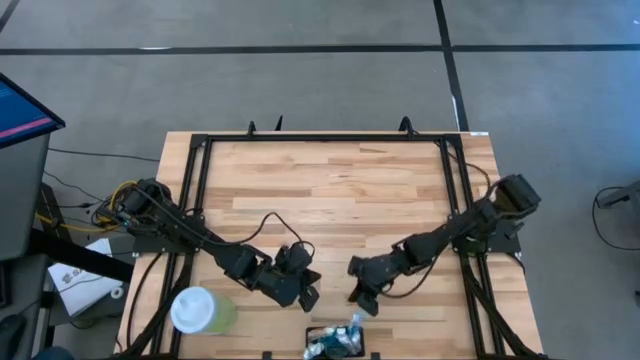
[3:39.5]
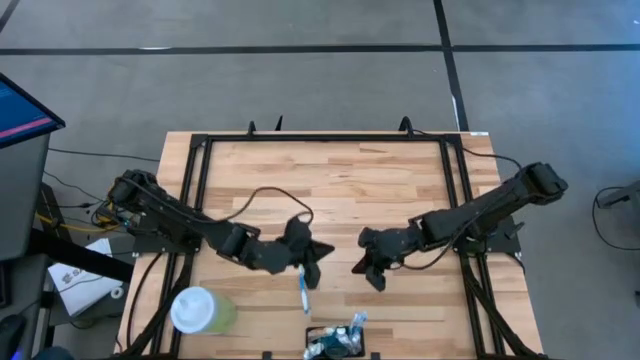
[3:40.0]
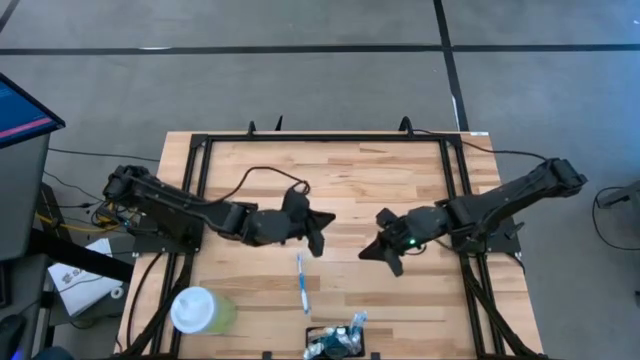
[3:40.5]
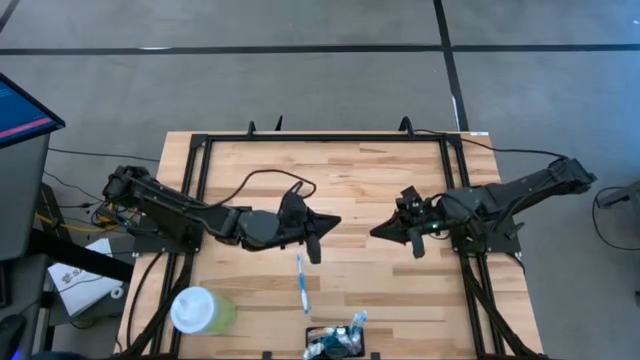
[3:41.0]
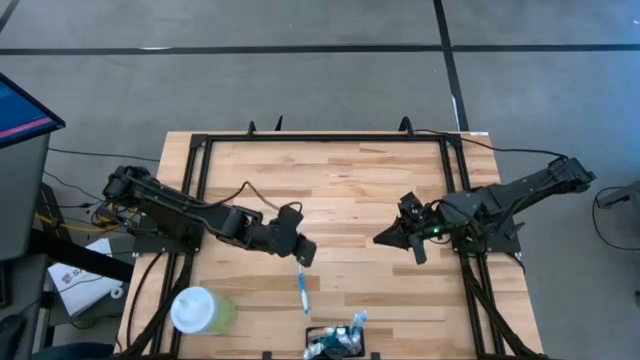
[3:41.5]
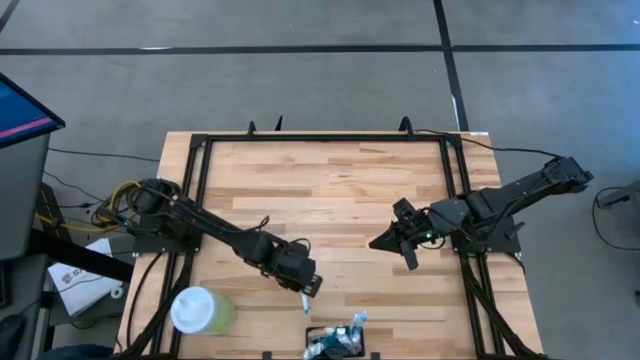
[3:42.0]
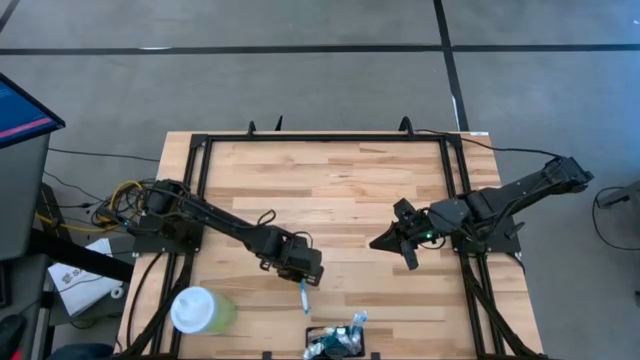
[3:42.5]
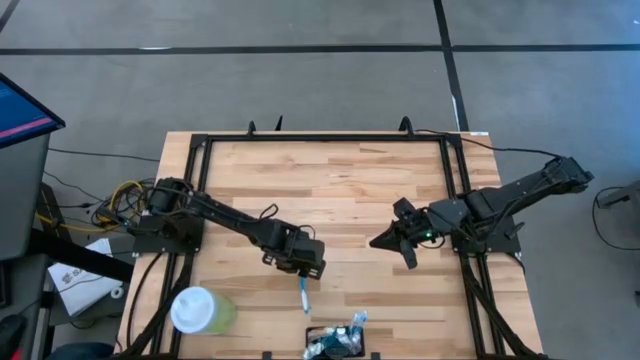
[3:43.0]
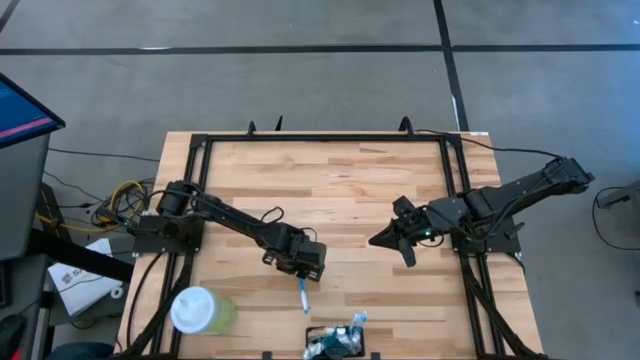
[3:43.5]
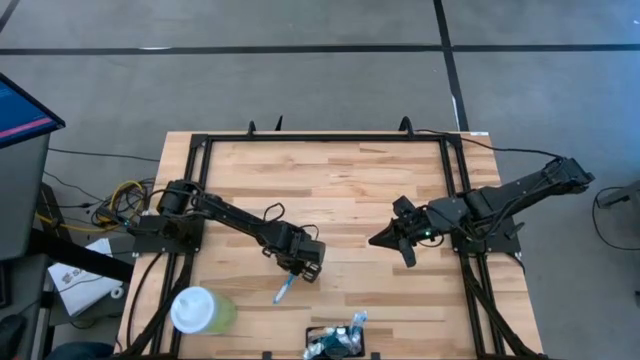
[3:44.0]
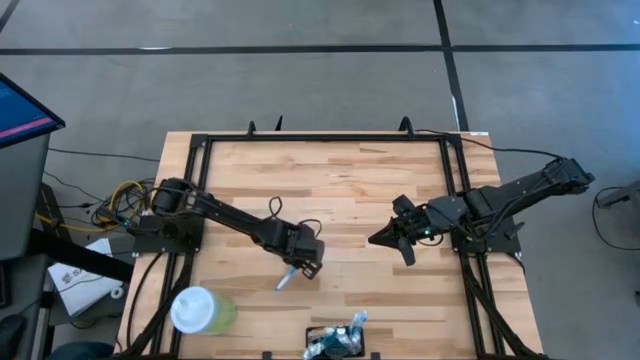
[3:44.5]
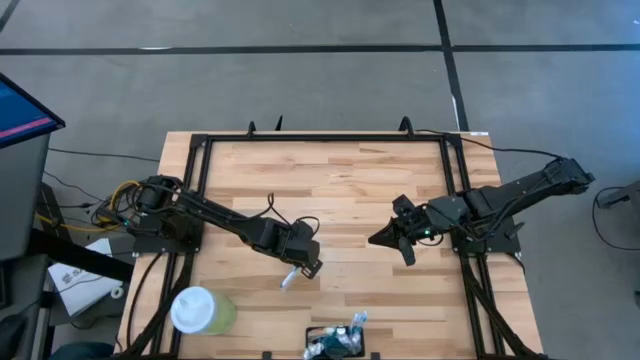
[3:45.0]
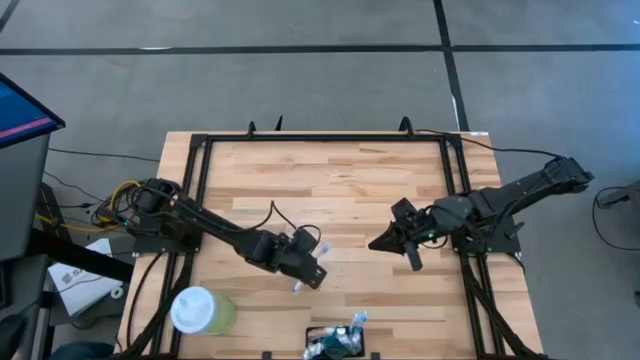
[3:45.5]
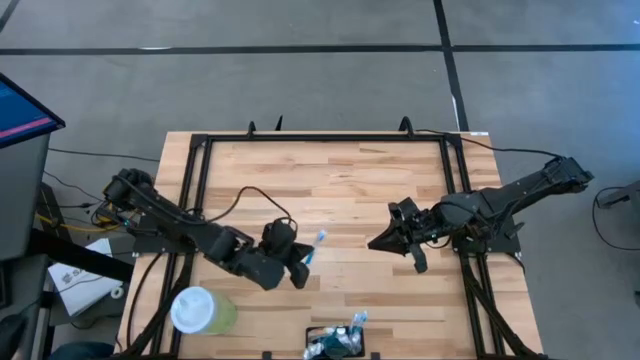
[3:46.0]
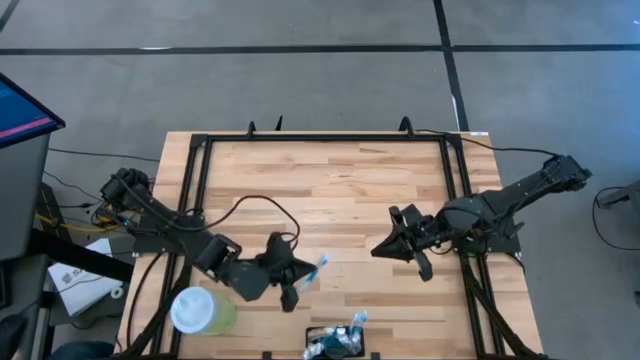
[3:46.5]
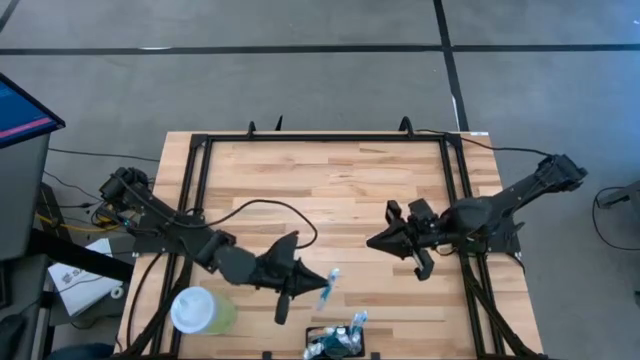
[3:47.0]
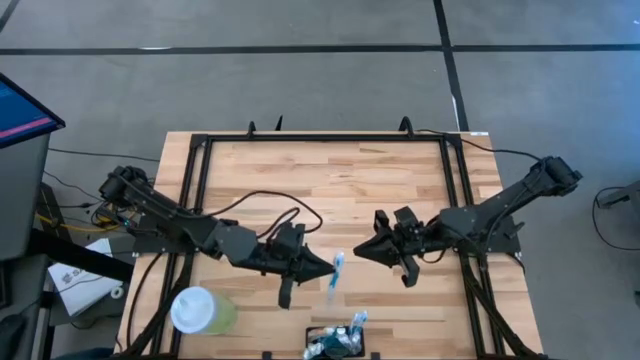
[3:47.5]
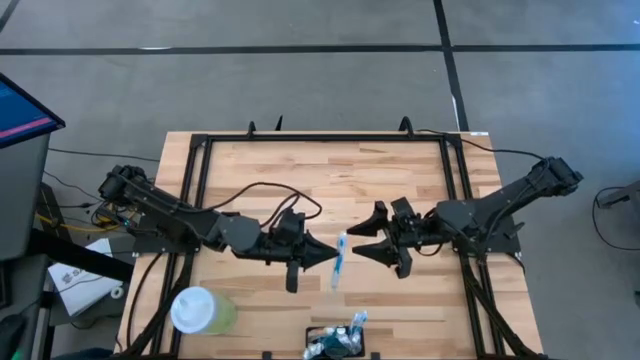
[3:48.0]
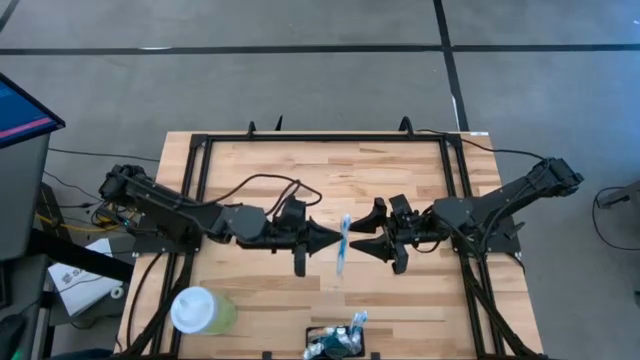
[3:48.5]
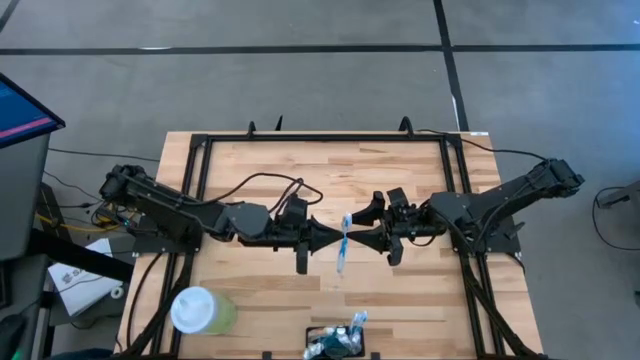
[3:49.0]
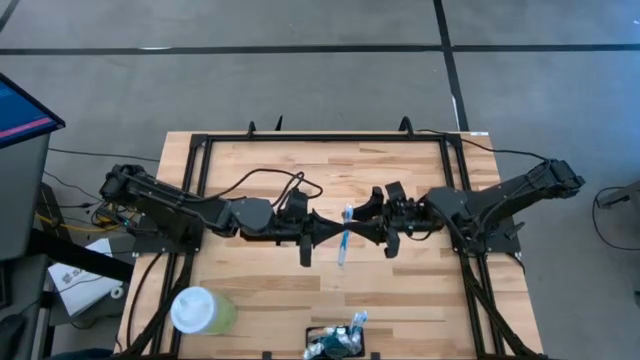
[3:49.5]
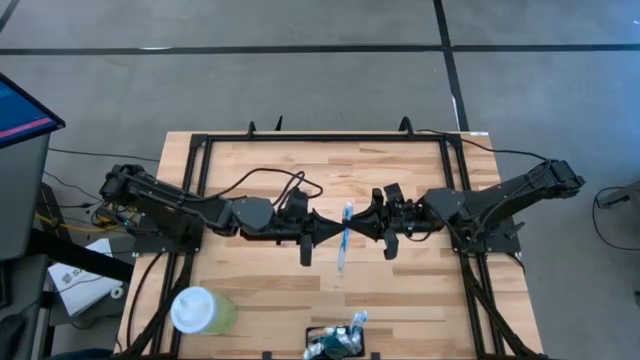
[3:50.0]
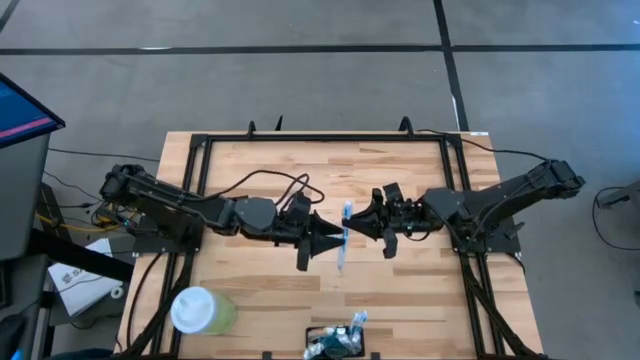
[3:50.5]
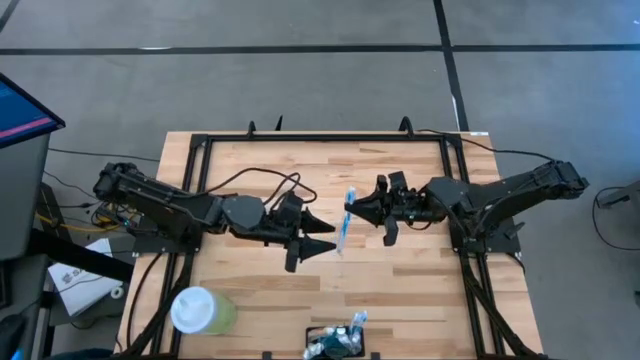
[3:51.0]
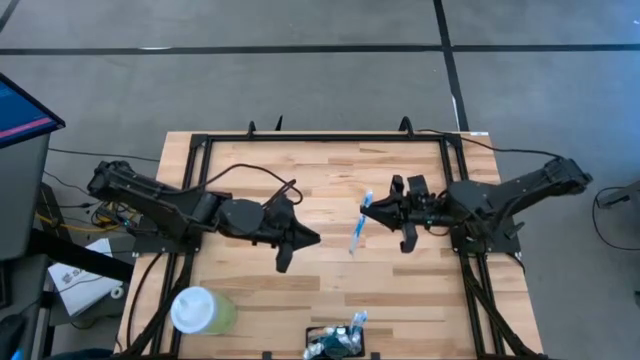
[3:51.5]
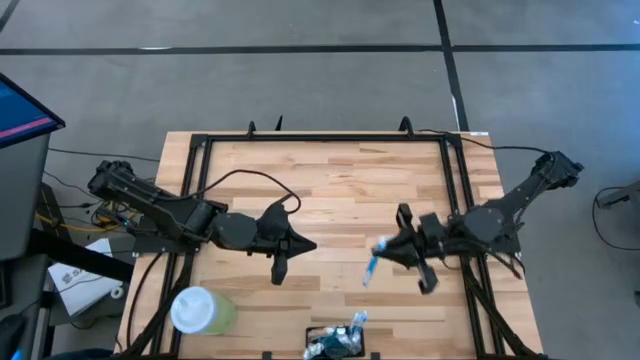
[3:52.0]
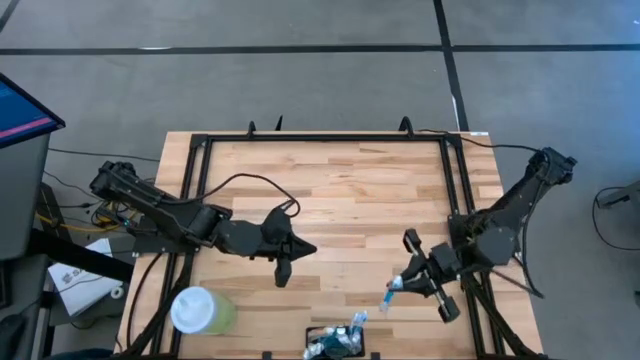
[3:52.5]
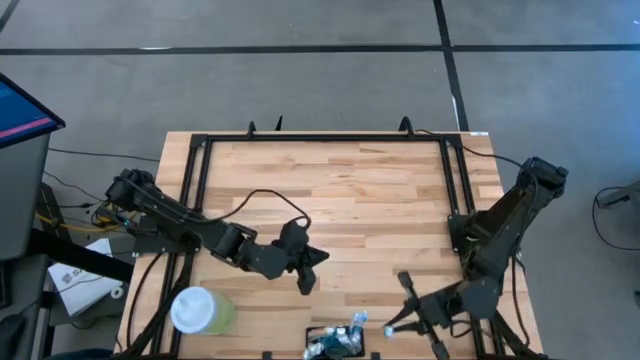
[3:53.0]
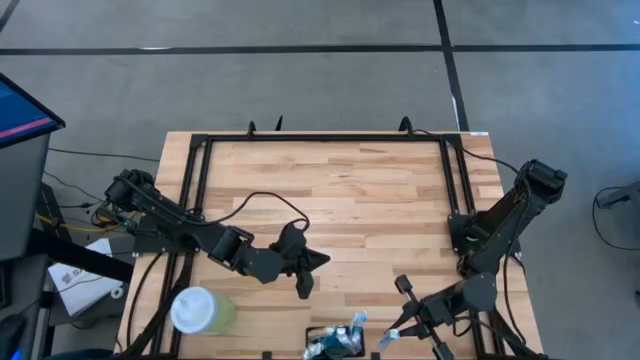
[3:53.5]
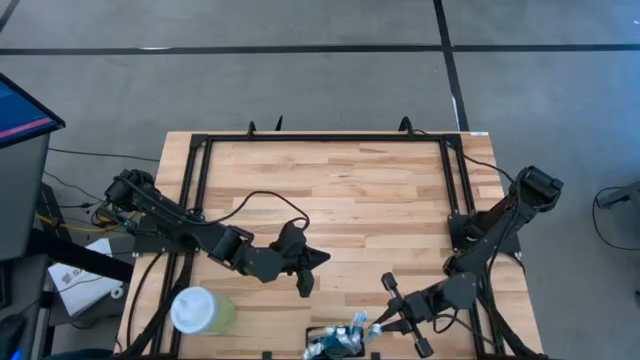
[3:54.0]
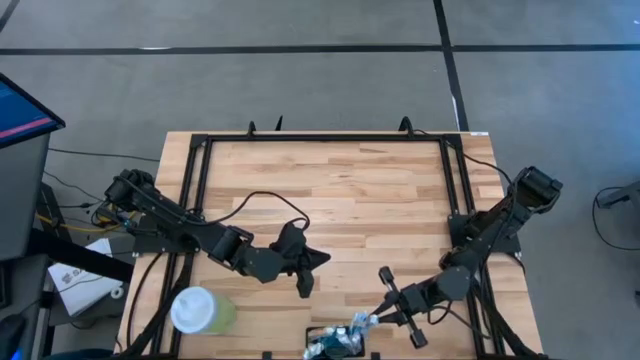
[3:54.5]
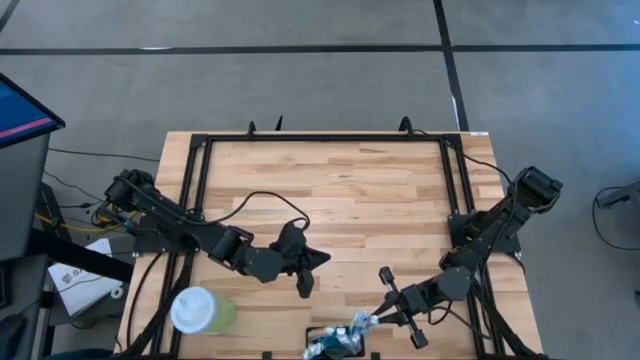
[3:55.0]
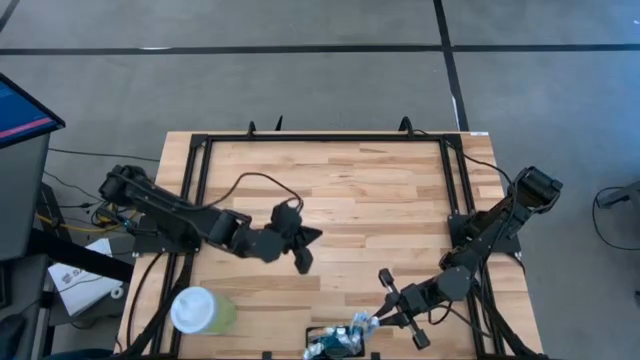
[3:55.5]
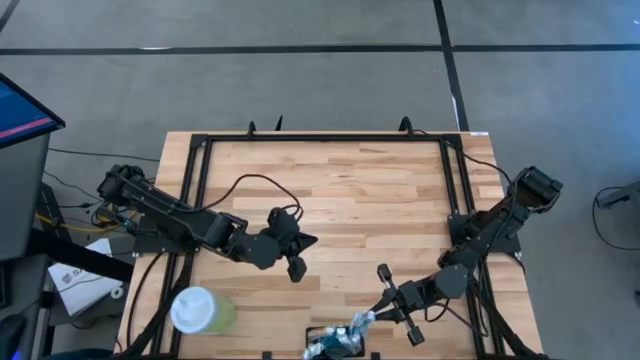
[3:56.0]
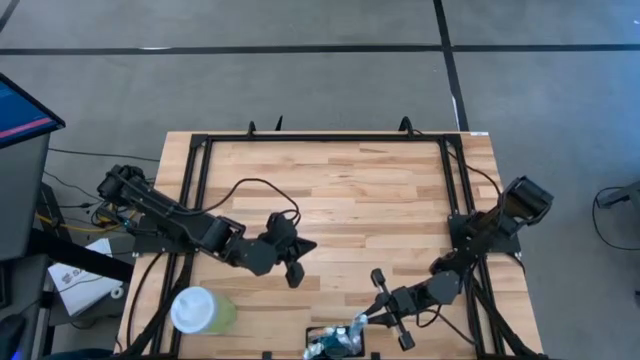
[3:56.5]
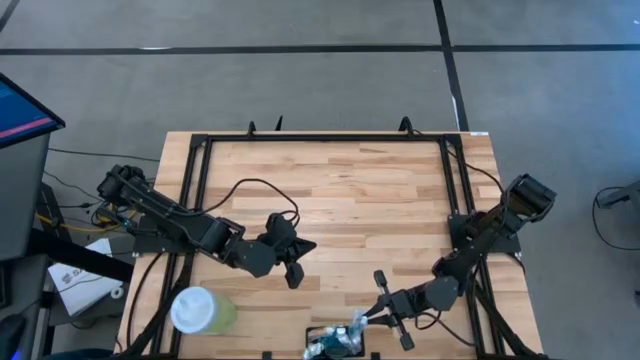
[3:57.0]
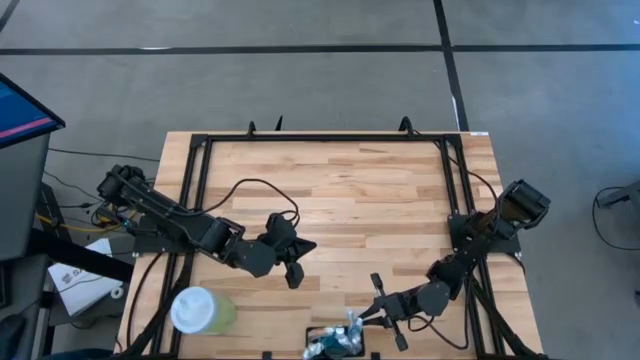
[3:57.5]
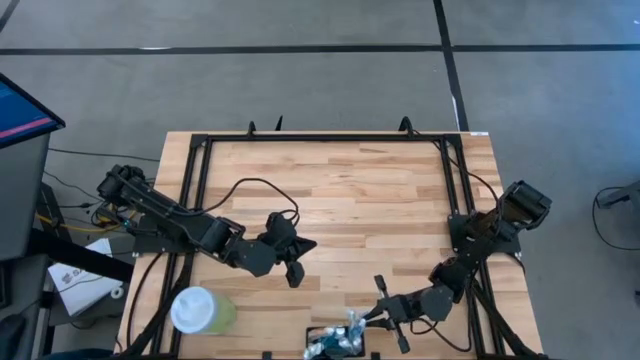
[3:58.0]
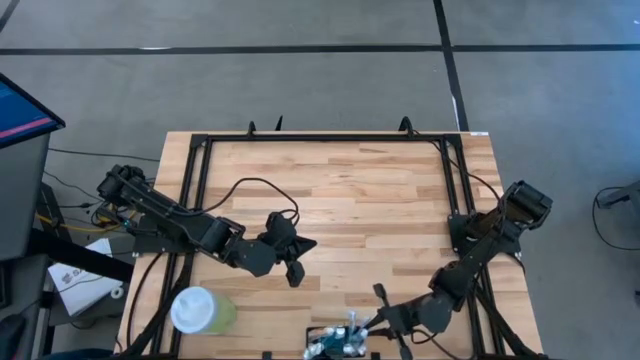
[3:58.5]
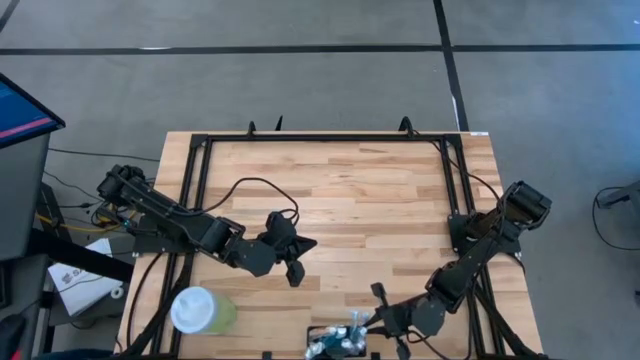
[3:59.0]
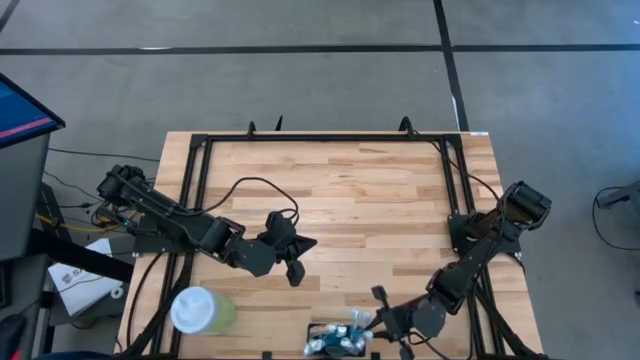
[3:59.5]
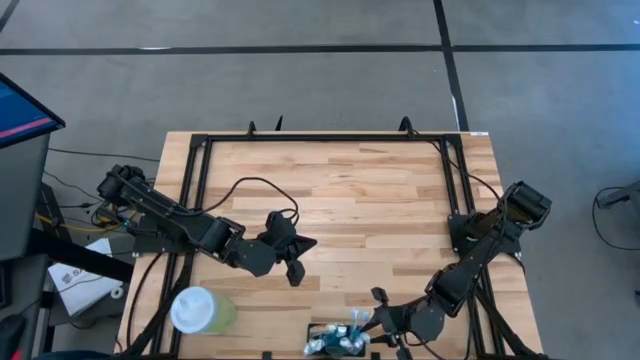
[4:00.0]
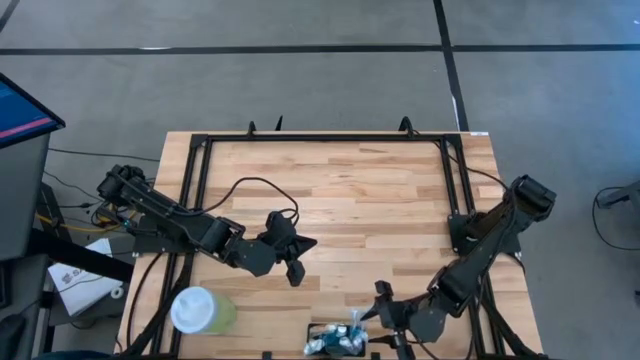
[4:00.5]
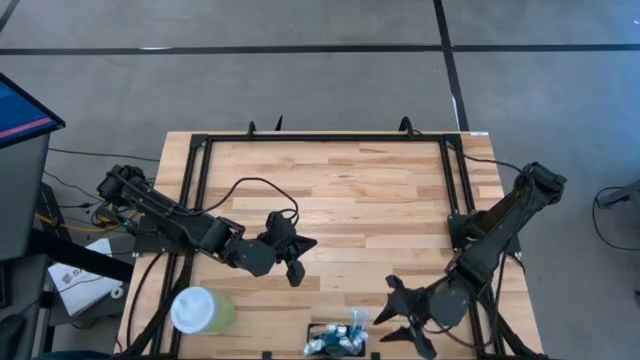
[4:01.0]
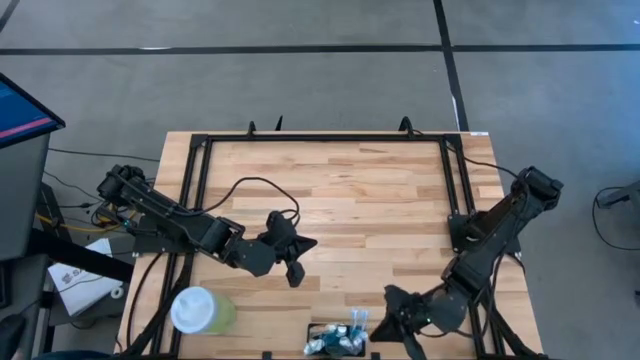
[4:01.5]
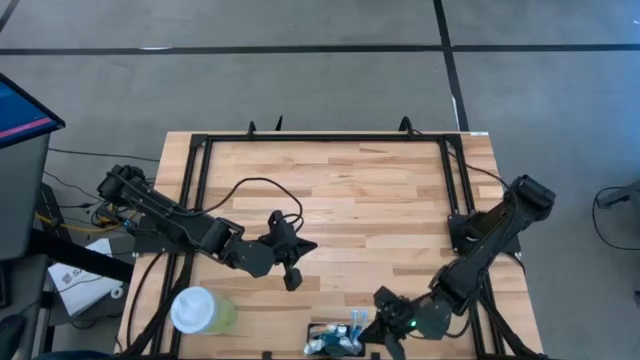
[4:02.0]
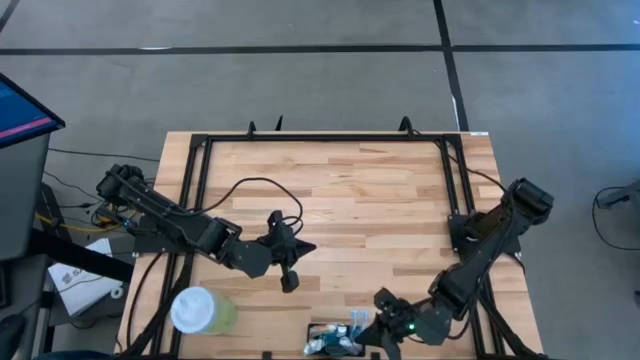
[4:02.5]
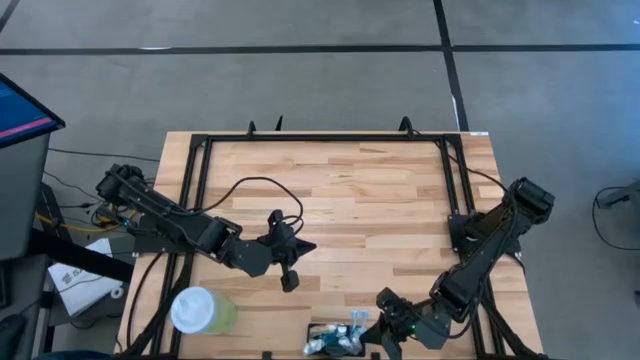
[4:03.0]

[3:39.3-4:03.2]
Task: Pick & Place toothbrushing station
Put the blue toothbrush into the black wire organizer
